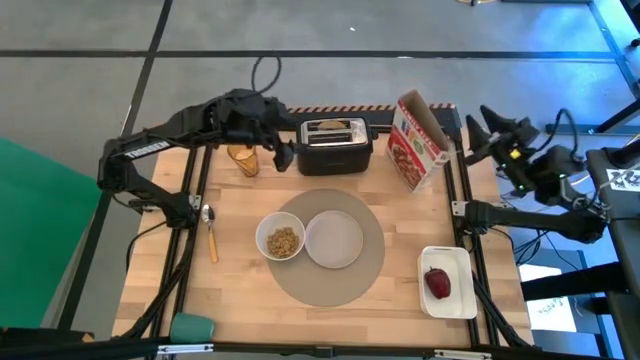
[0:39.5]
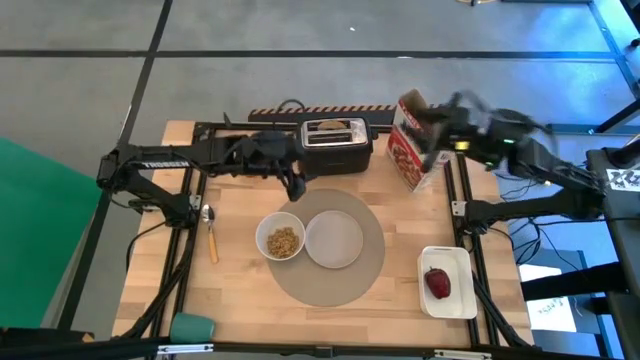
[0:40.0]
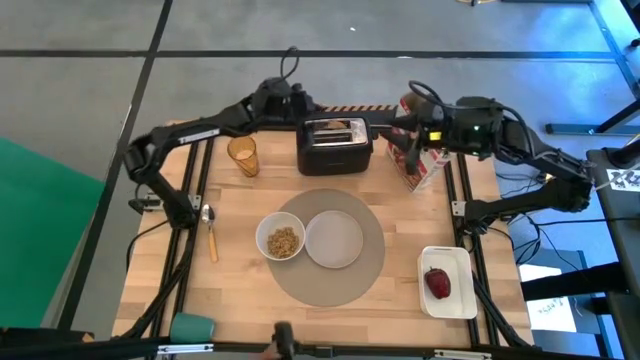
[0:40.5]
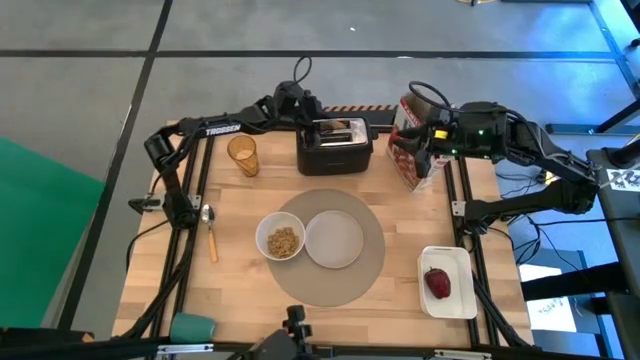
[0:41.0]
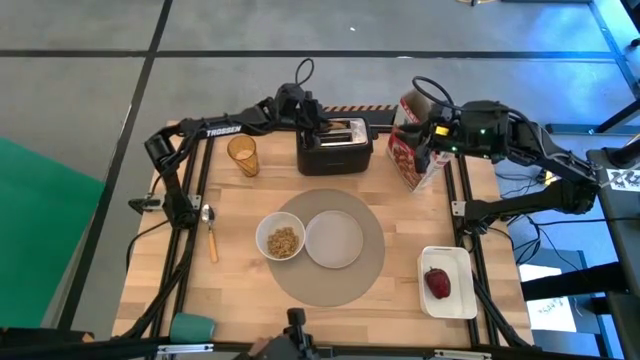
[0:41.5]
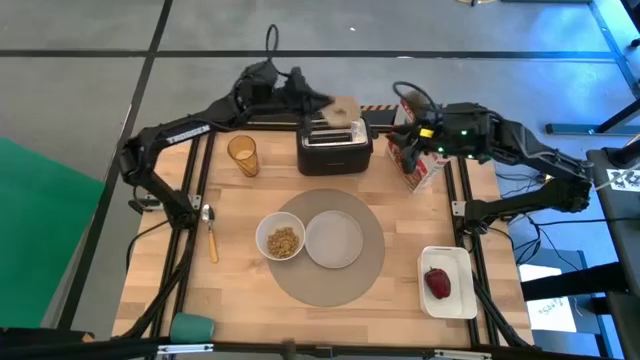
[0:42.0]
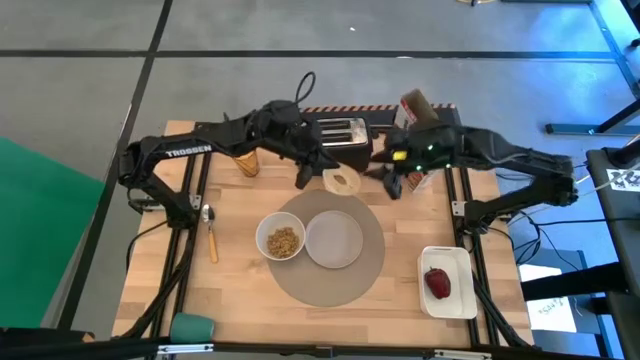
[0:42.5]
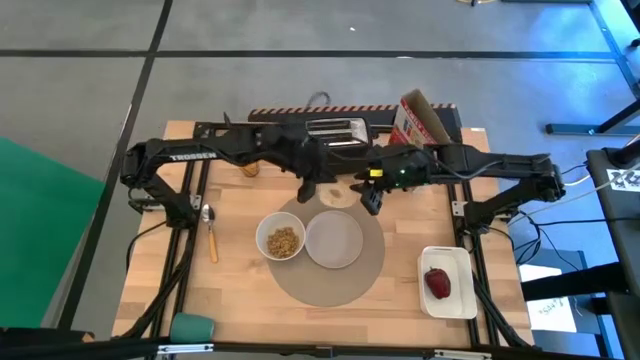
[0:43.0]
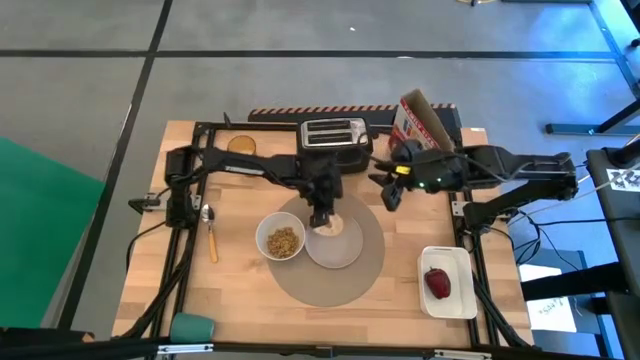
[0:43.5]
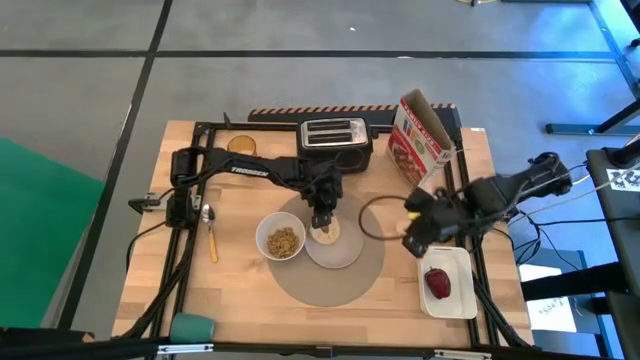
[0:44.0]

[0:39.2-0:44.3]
Task: Arrange a breakfast setting
Put the bagel on the gray plate

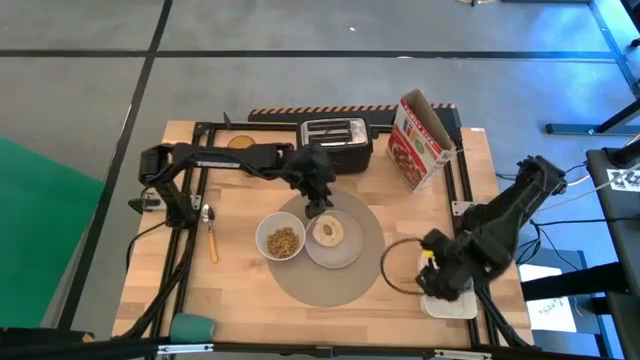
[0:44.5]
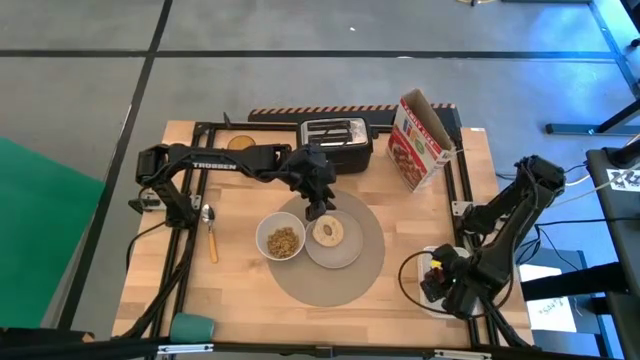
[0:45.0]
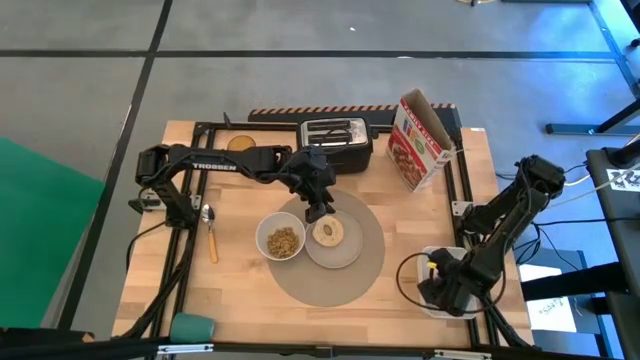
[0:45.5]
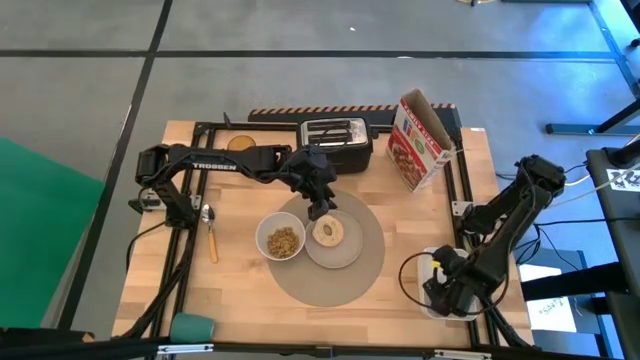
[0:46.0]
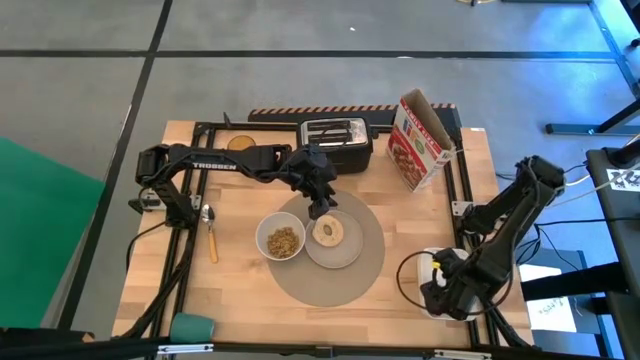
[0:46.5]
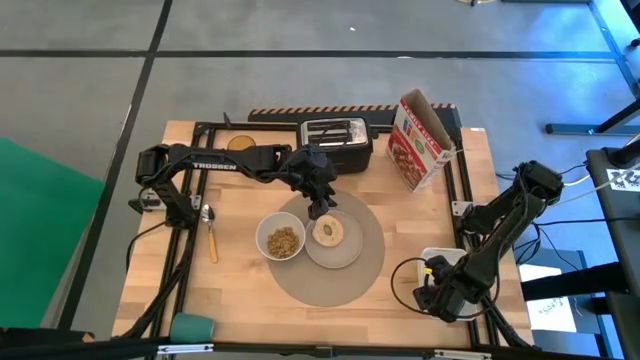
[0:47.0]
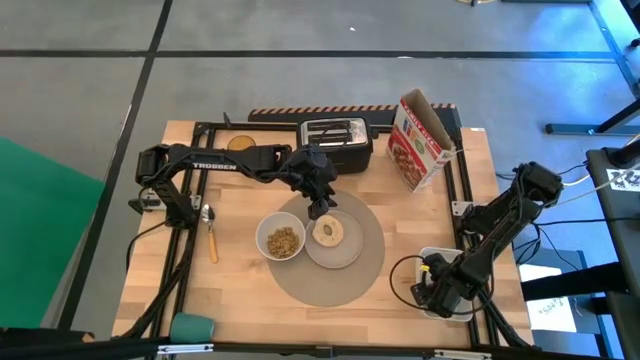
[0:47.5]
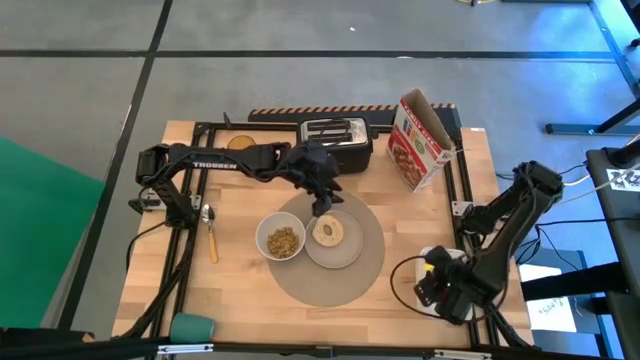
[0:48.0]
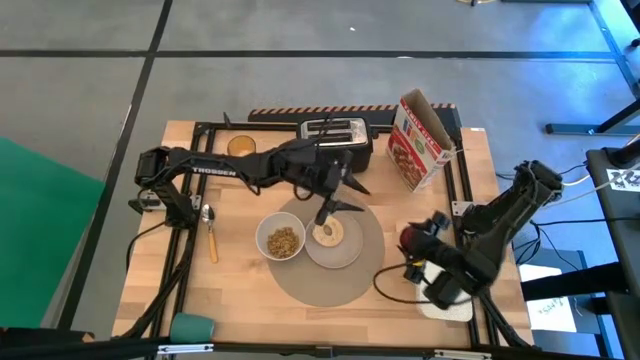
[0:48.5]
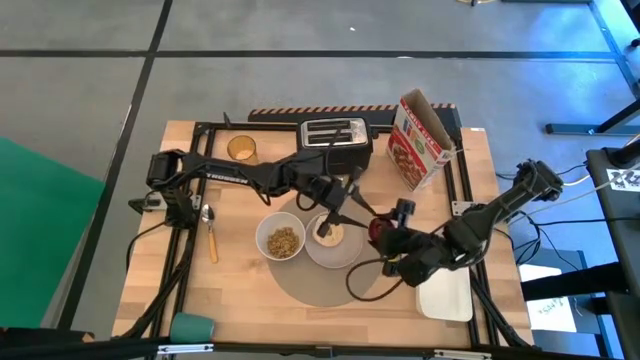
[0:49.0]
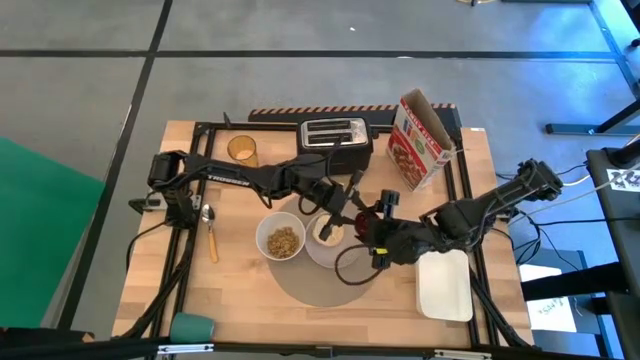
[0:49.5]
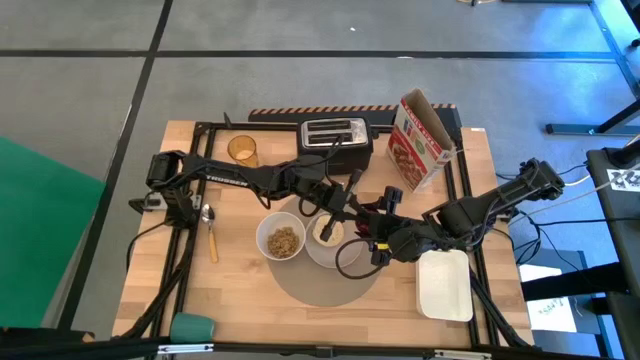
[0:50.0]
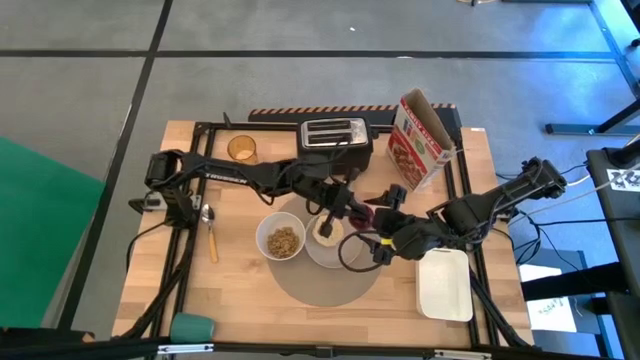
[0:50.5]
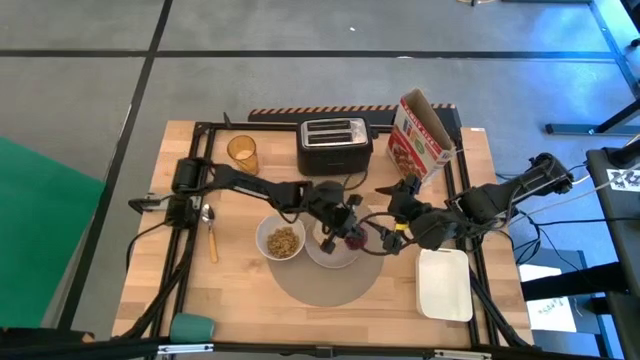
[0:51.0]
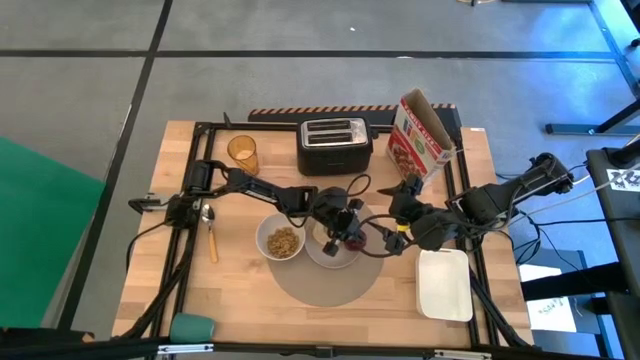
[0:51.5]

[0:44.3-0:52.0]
Put the red apple on the gray plate

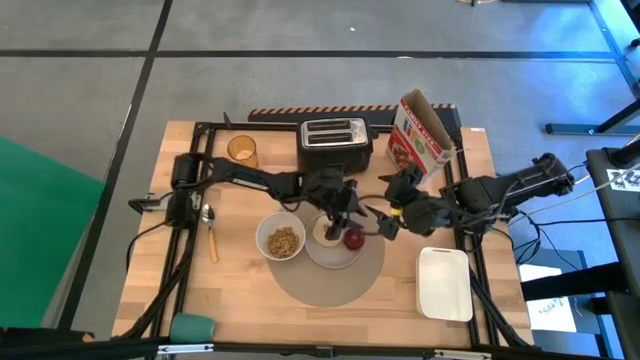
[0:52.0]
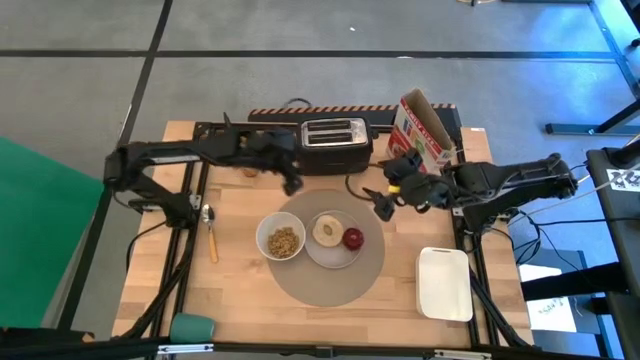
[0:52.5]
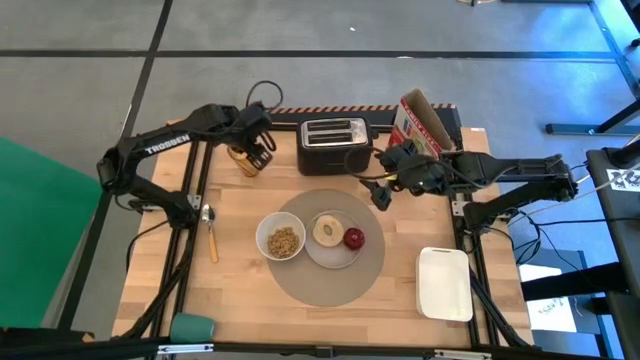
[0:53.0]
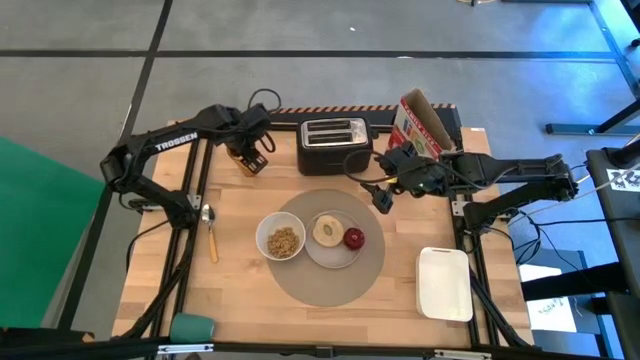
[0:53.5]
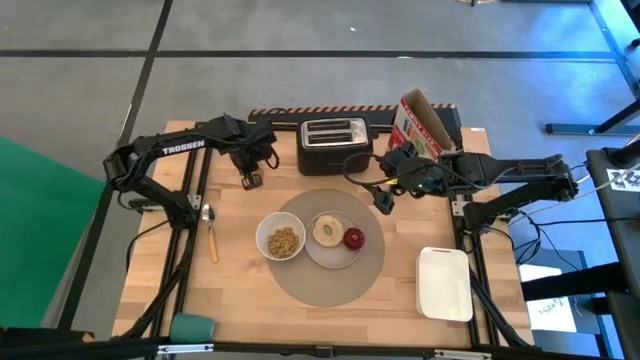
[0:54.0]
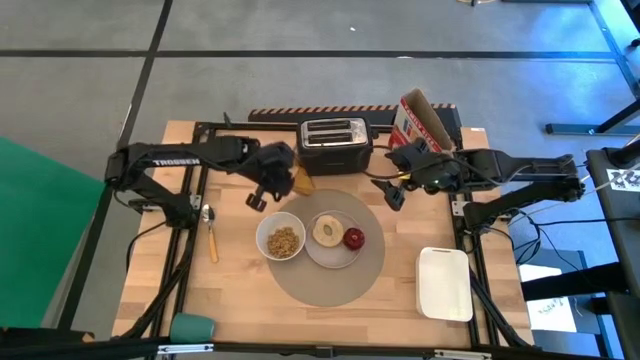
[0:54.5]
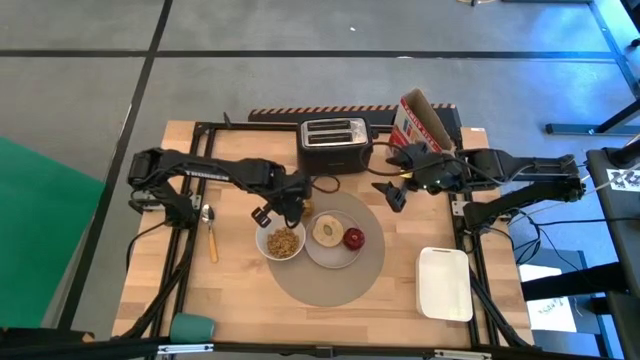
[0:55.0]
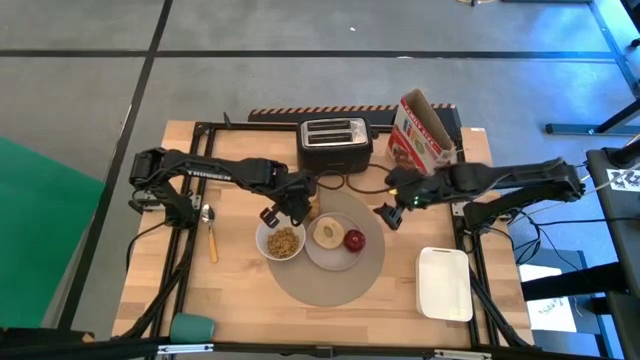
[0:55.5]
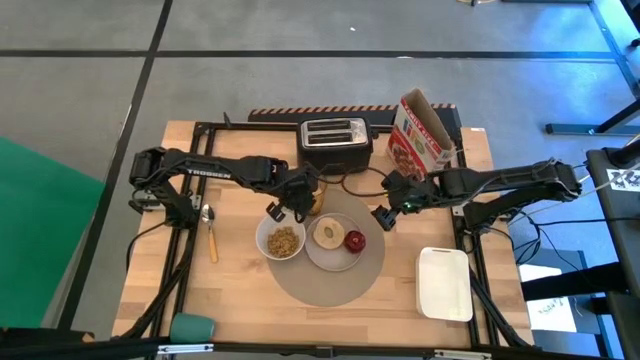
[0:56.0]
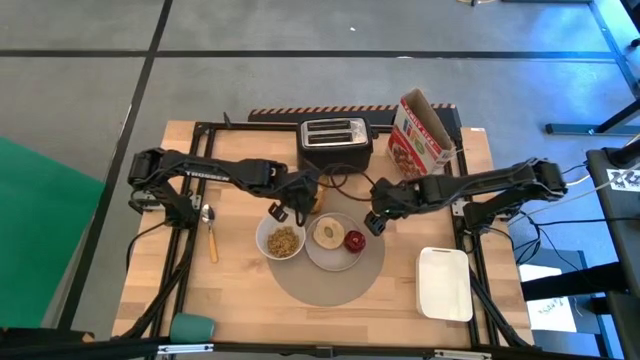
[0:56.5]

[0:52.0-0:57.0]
Put the yellow cup on the gray table mat

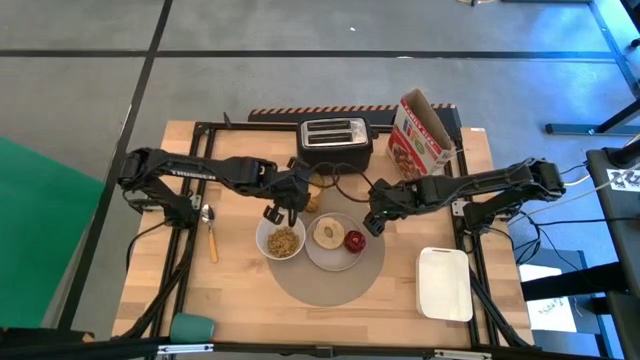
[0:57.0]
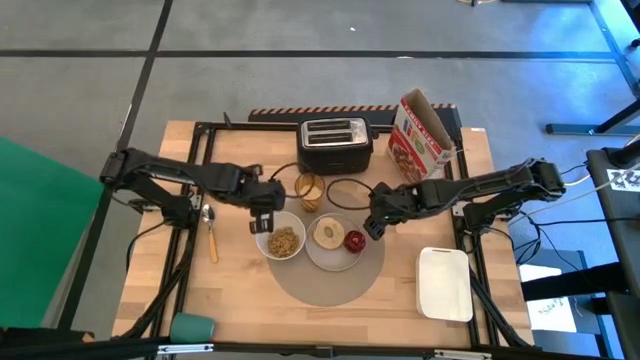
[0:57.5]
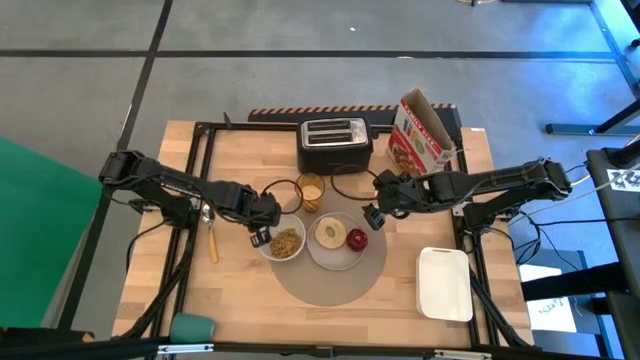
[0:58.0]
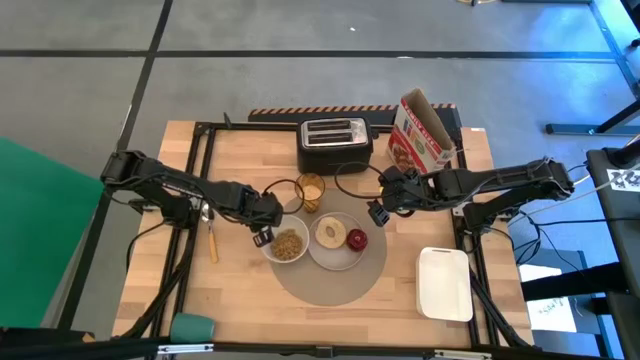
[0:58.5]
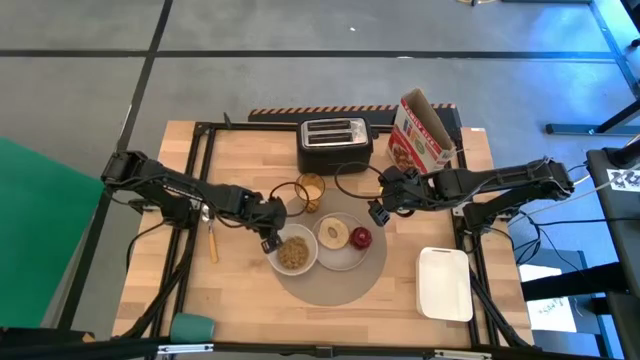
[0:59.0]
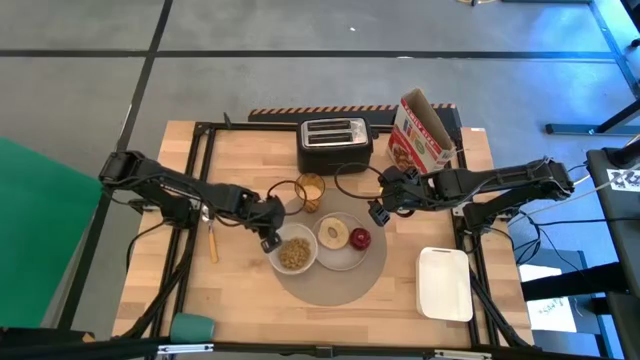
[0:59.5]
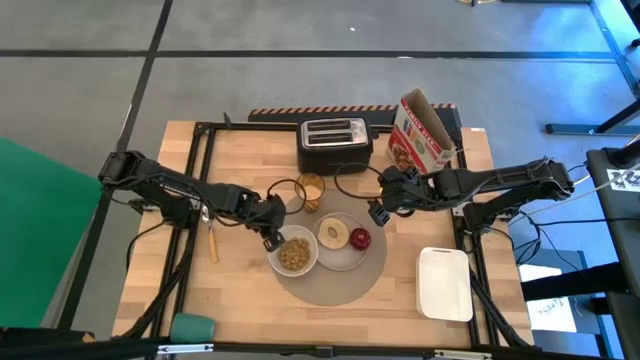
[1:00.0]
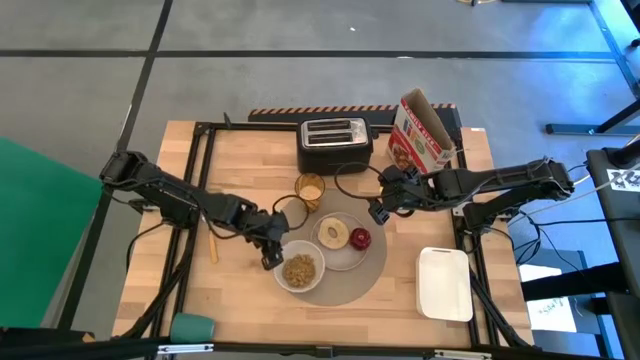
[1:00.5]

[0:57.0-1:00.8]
Adjust the white bowl on the gray table mat
